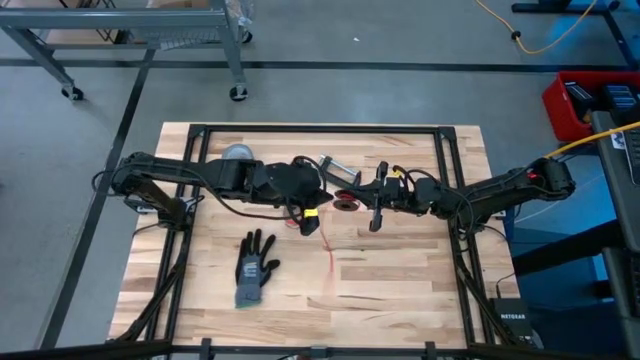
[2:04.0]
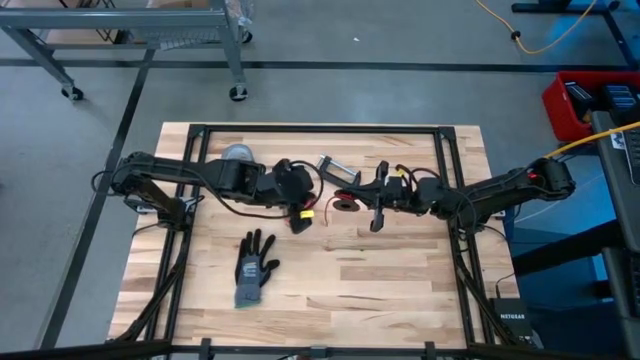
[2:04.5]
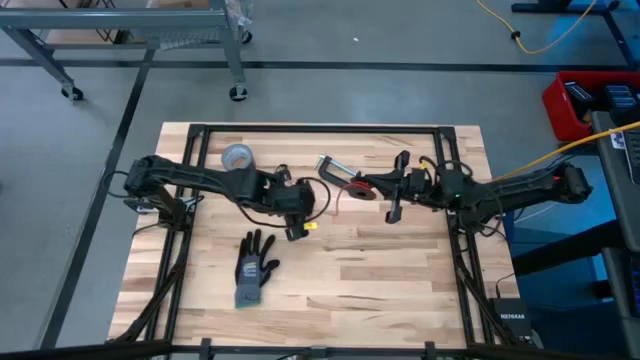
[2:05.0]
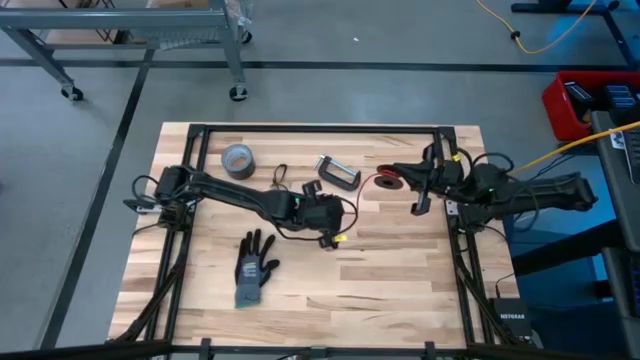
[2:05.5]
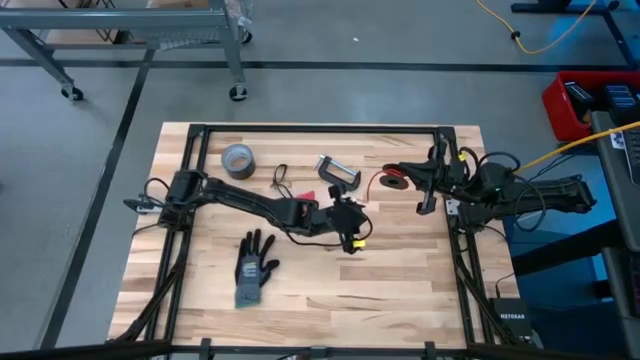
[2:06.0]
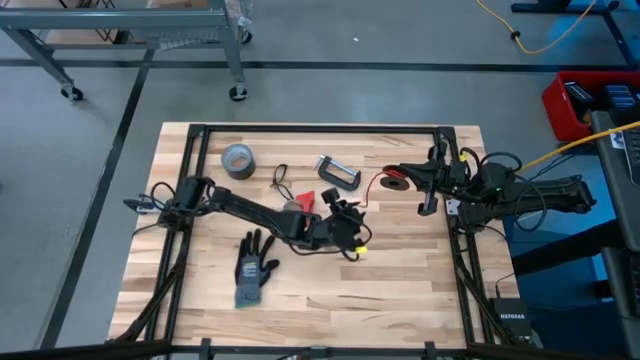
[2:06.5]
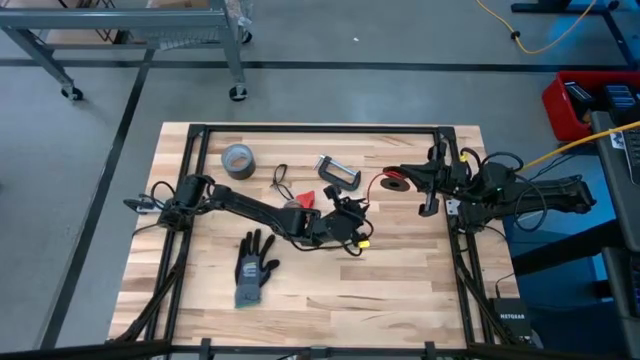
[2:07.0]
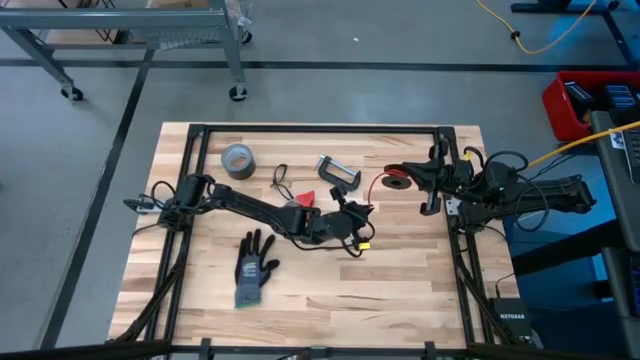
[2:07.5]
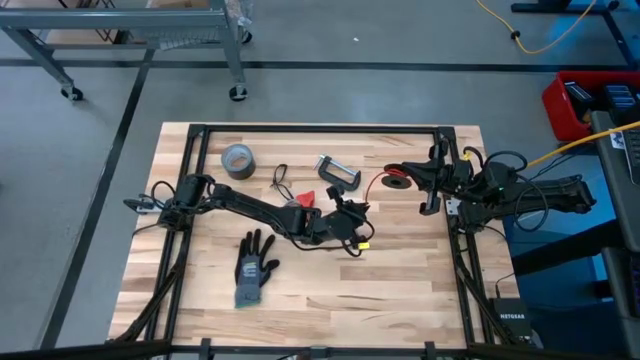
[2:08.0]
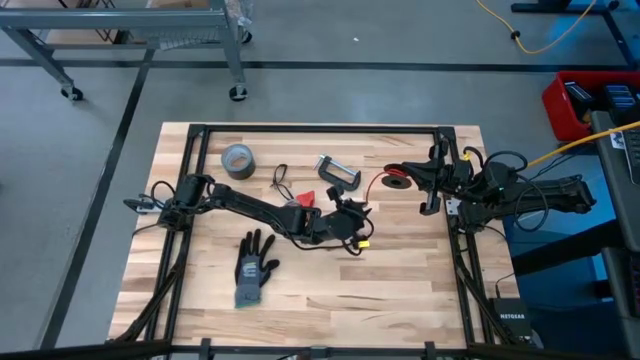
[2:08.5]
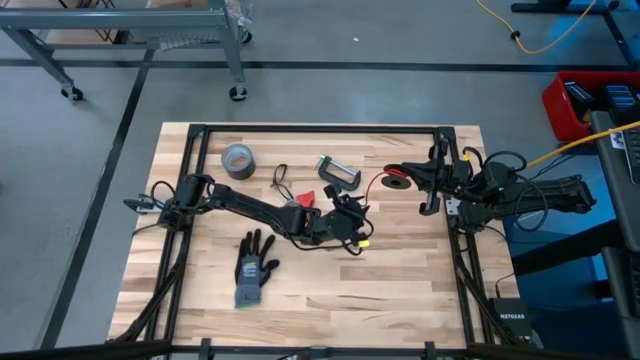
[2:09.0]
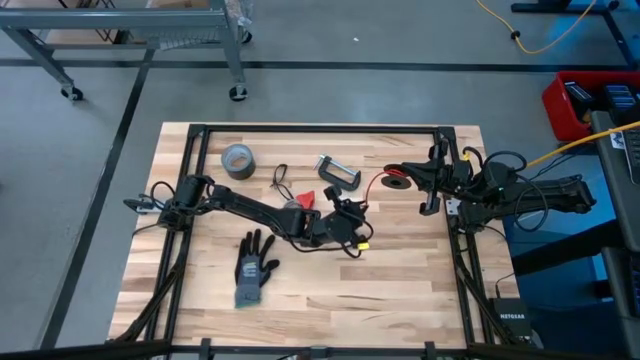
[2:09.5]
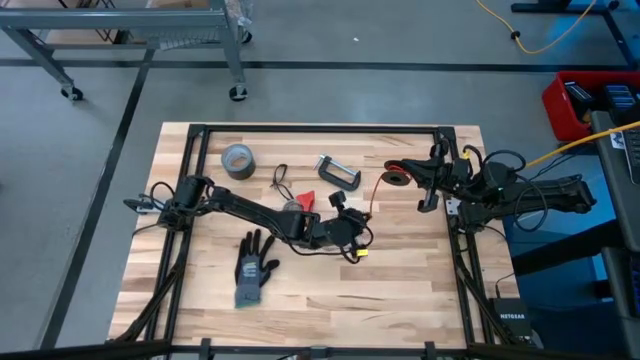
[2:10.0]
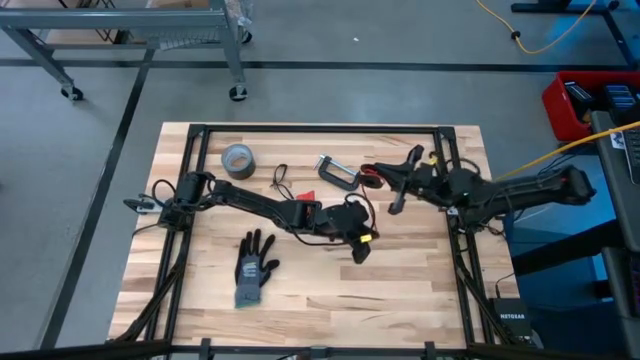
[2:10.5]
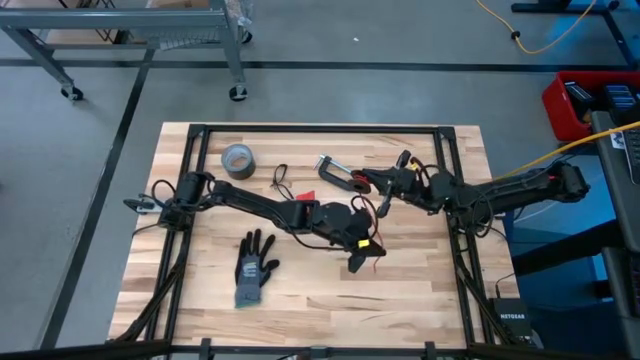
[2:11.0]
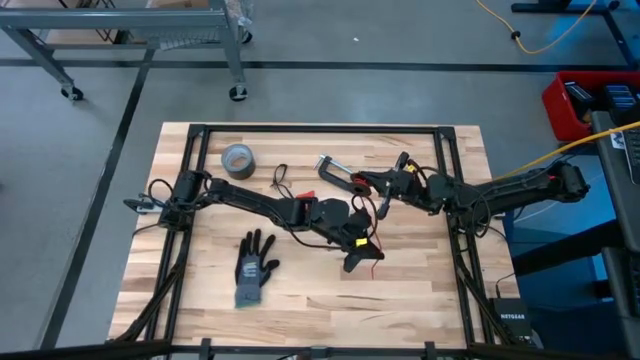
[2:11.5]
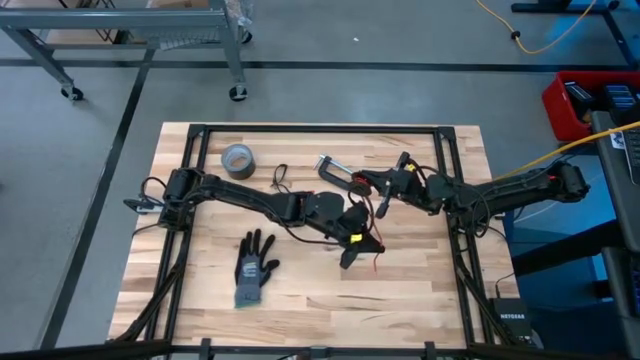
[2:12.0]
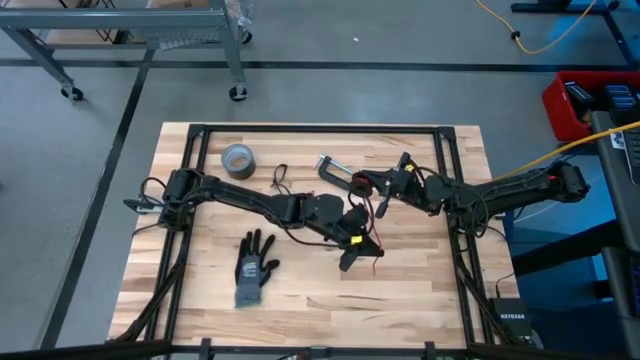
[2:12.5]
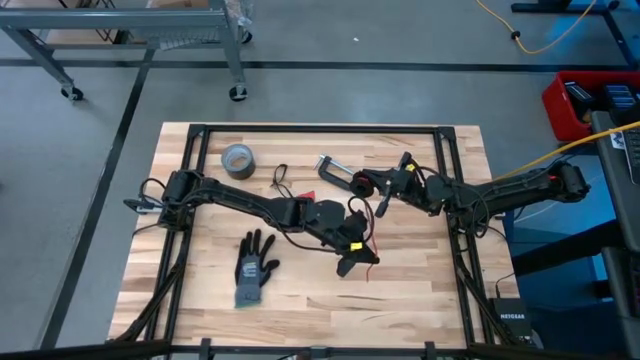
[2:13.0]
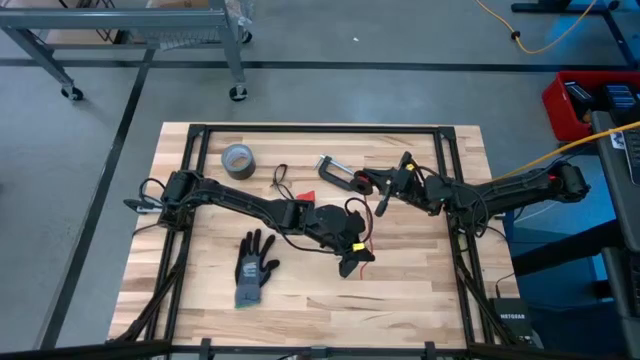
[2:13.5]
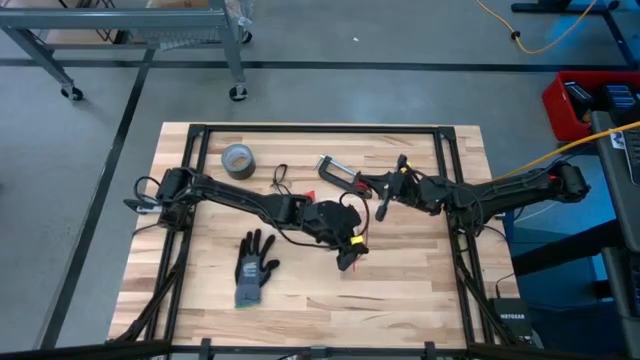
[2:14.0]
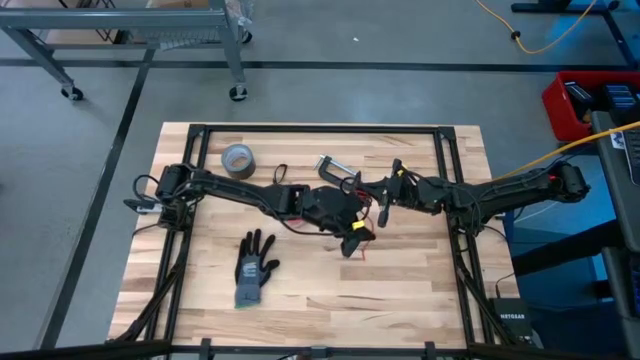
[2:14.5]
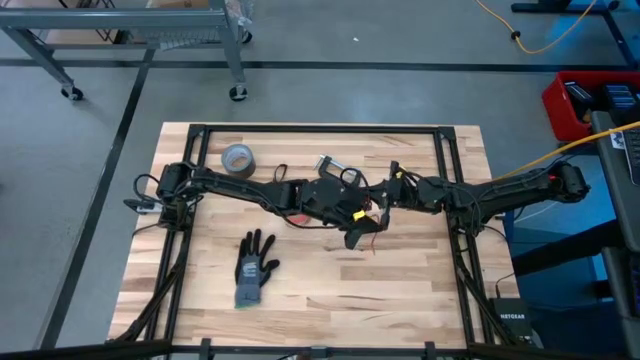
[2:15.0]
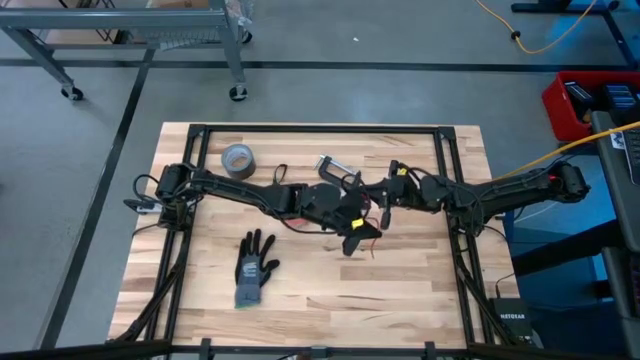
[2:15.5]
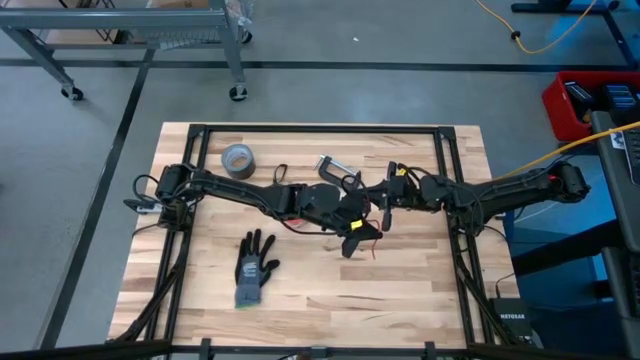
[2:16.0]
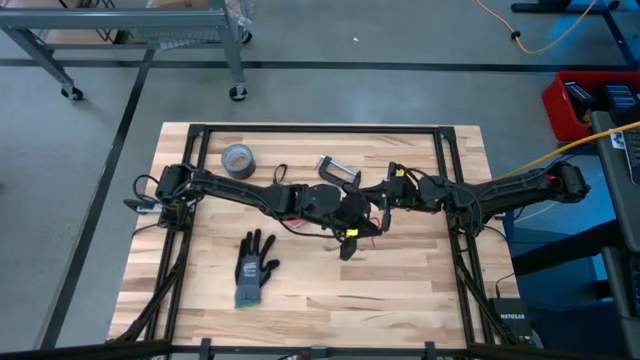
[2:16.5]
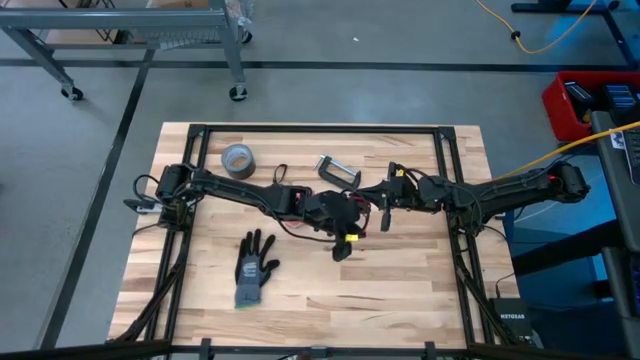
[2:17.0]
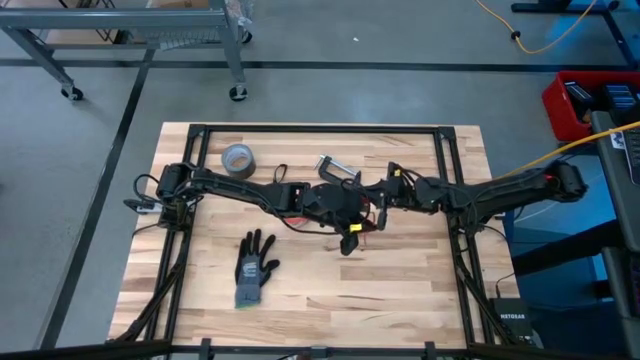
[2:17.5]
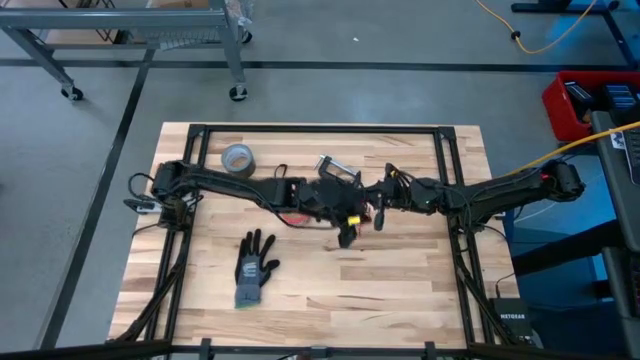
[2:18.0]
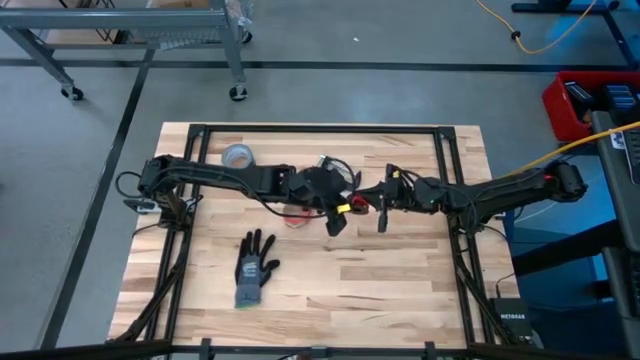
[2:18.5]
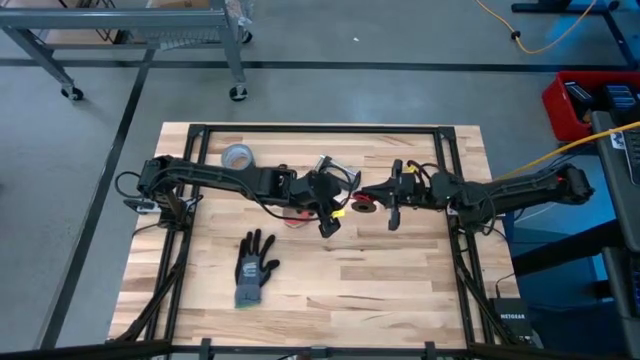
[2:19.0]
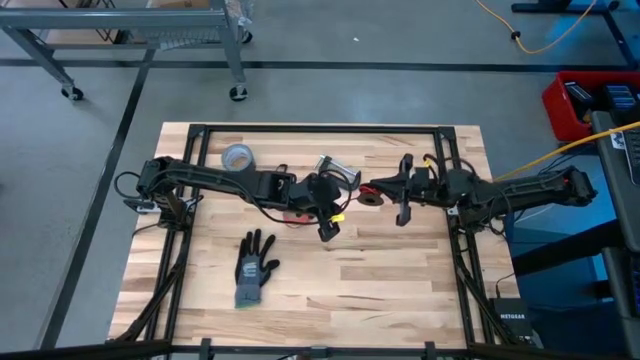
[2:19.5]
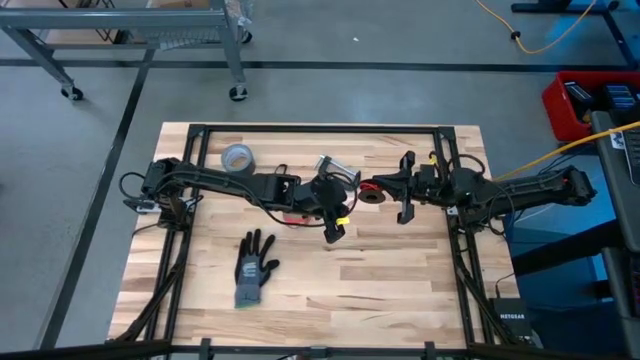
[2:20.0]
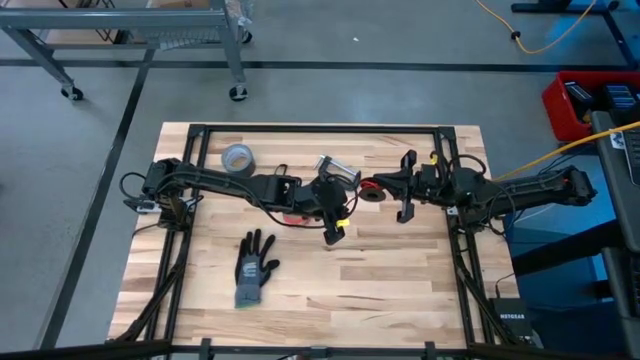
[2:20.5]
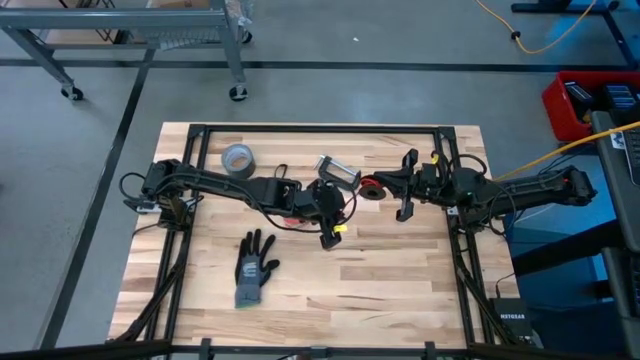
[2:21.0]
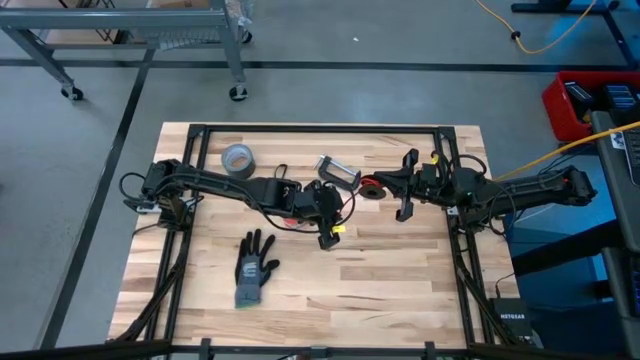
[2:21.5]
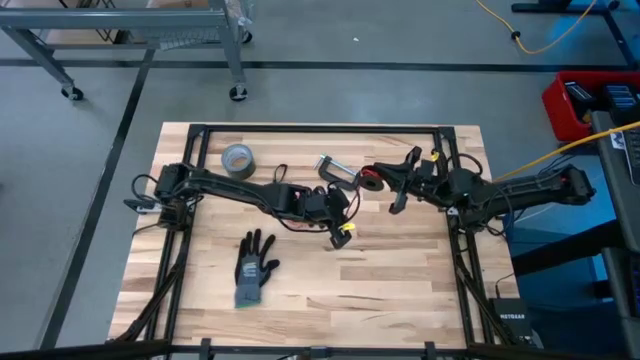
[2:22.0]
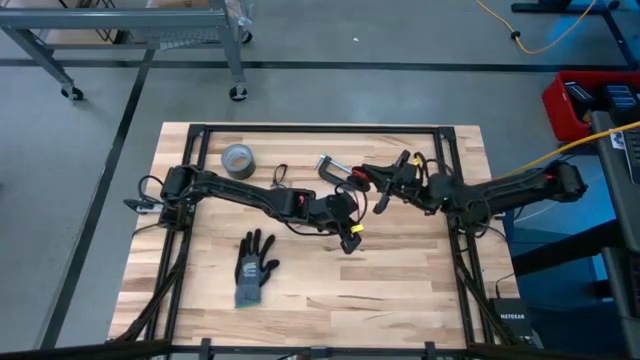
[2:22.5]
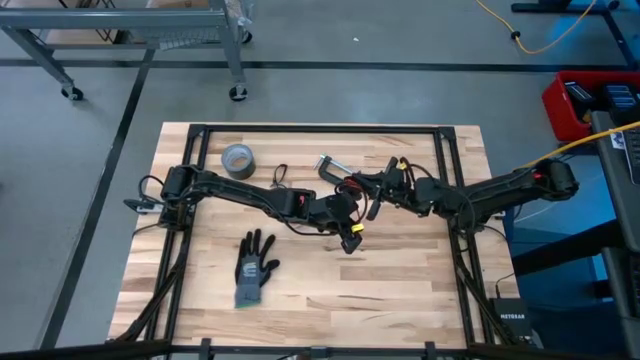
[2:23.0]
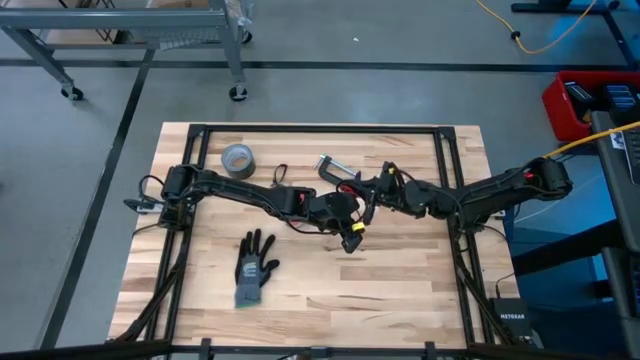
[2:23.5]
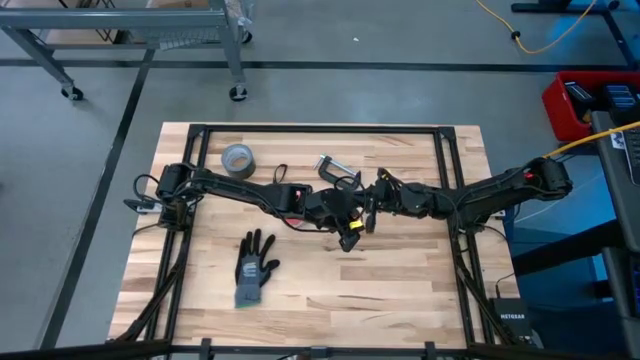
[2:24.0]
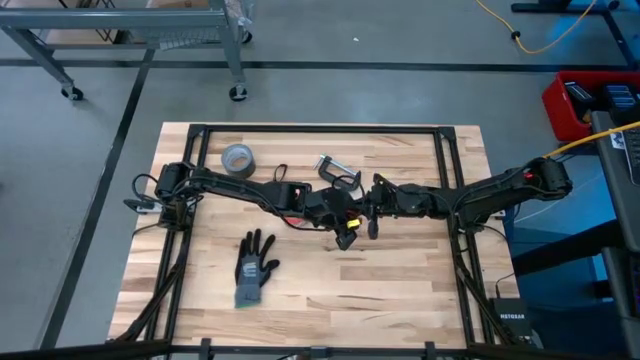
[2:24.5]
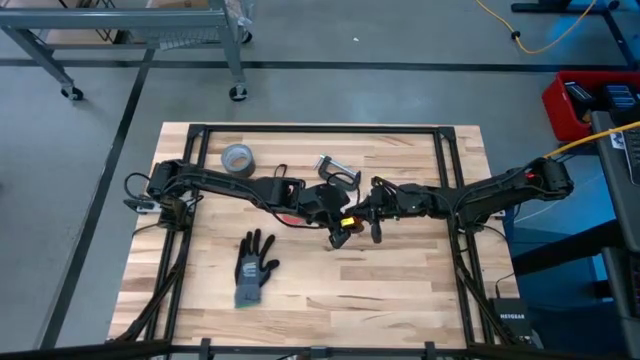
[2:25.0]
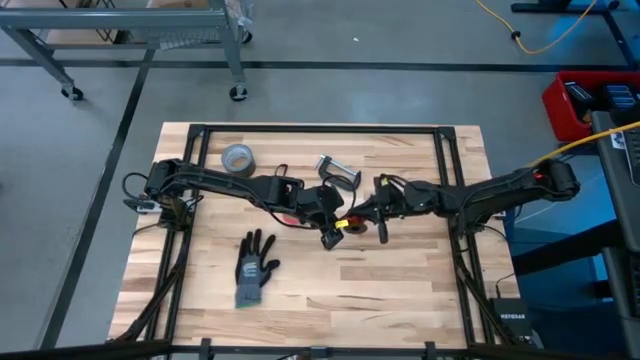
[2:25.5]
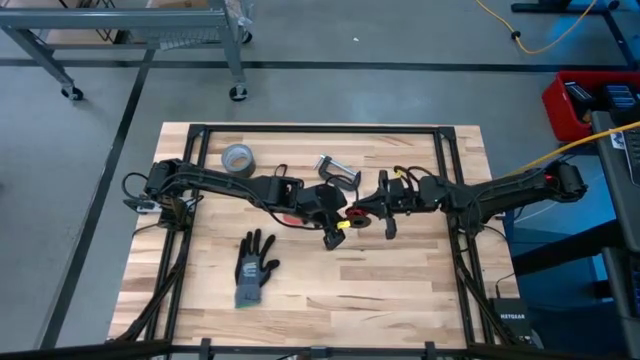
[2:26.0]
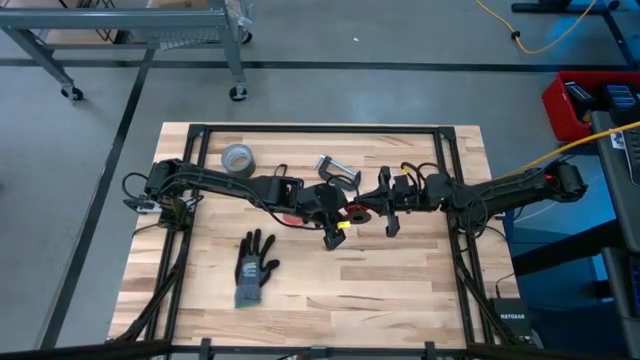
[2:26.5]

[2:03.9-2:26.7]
Task: Coil cords
Coil the red wire onto the spool
